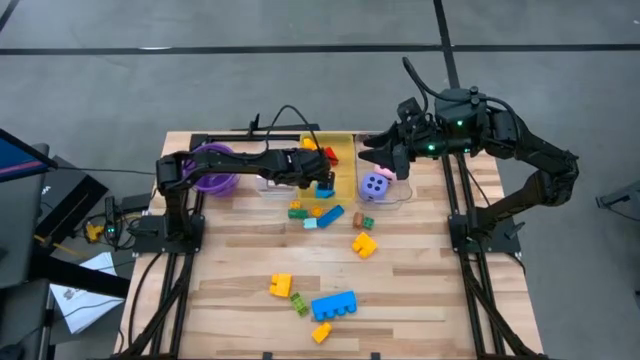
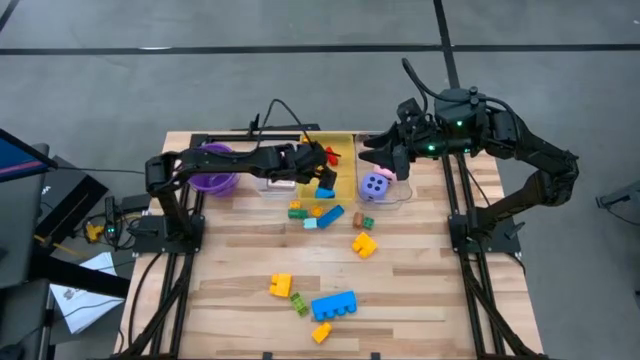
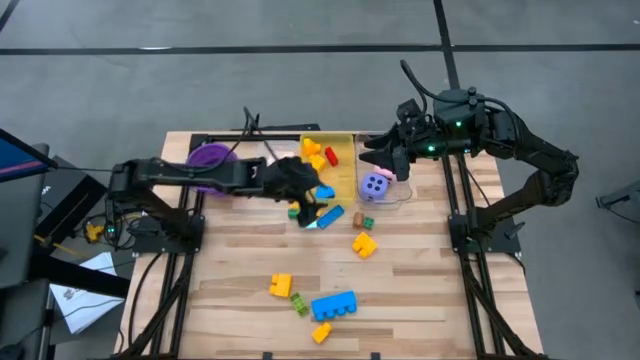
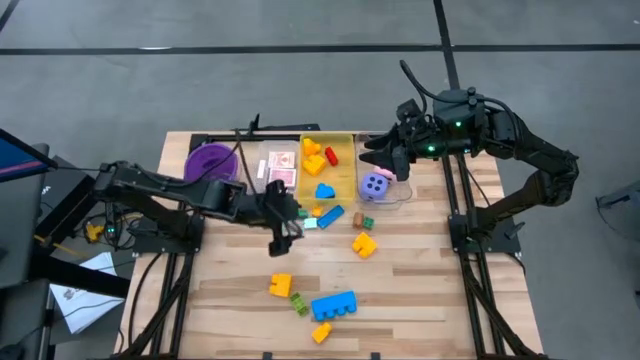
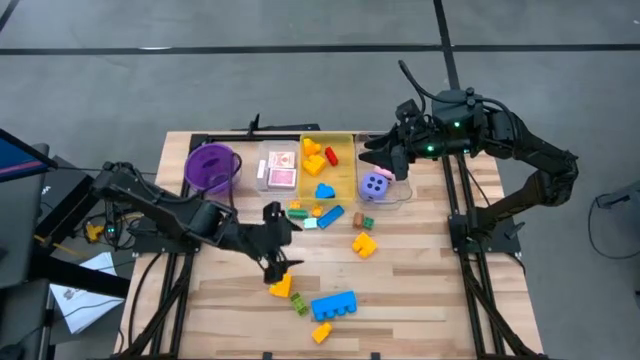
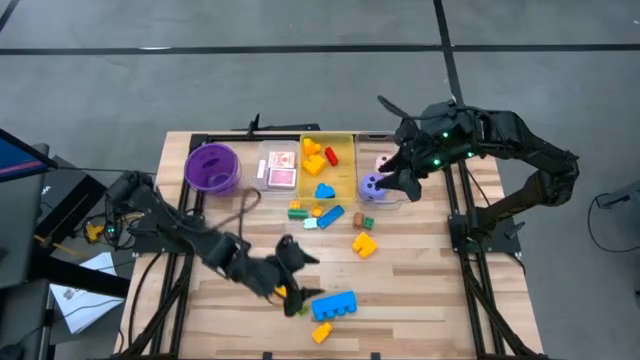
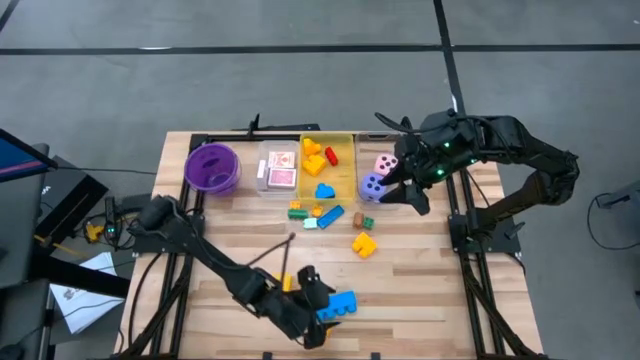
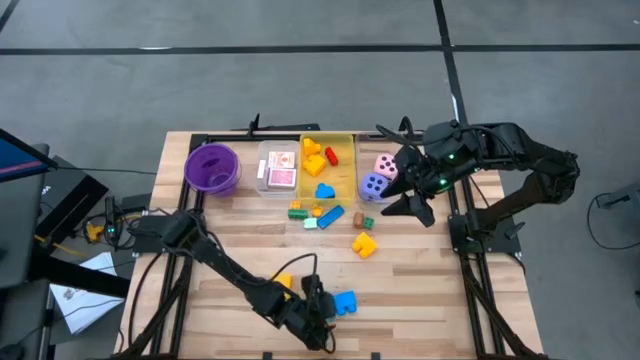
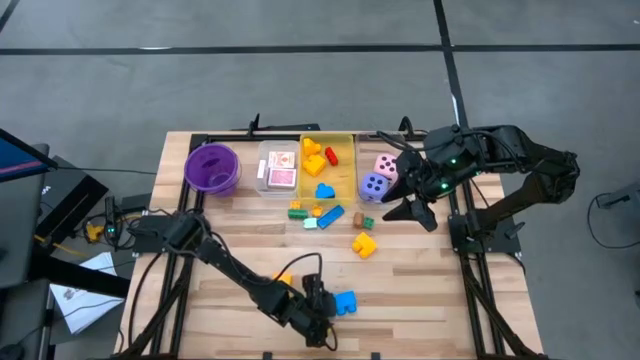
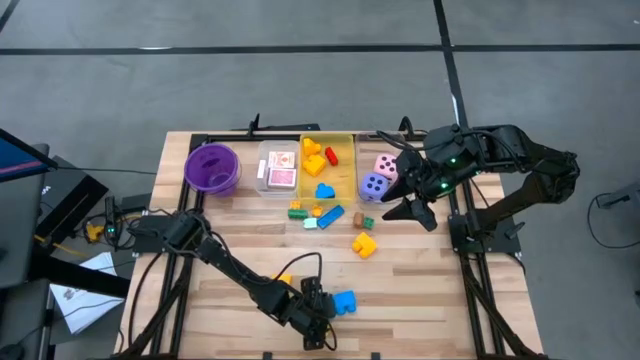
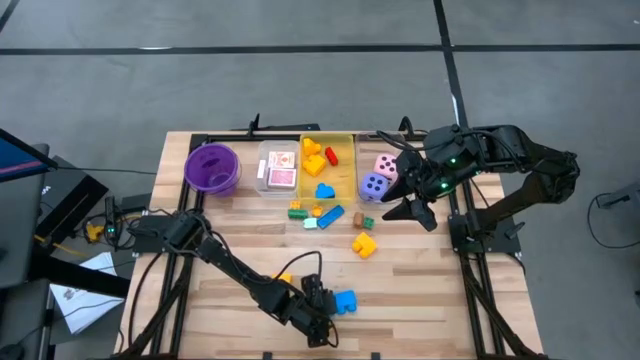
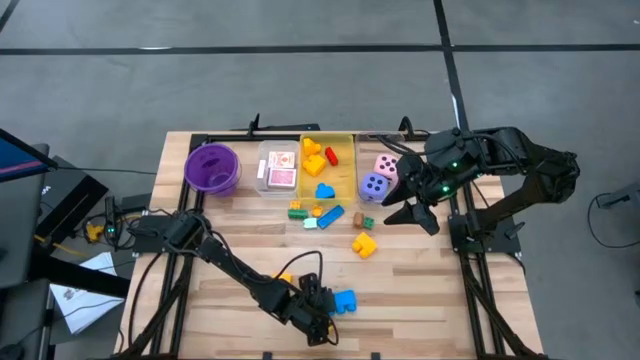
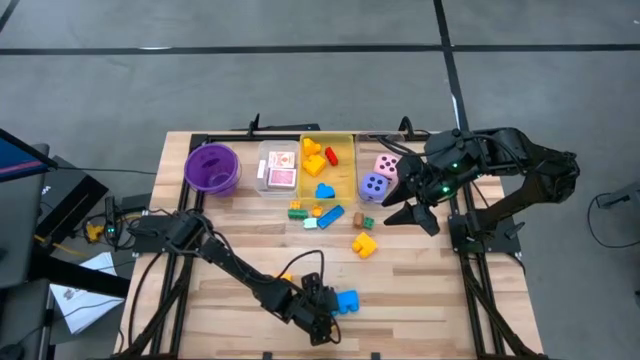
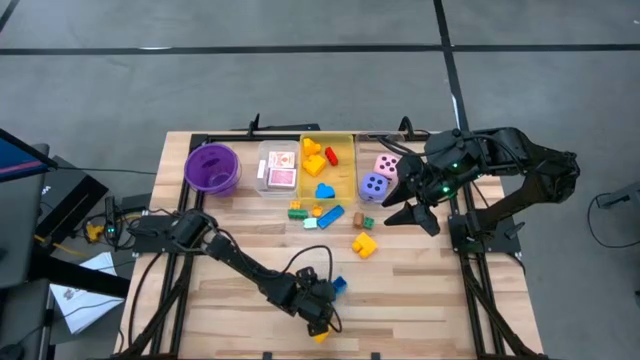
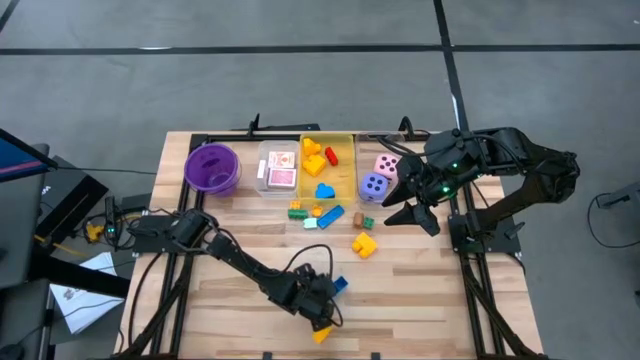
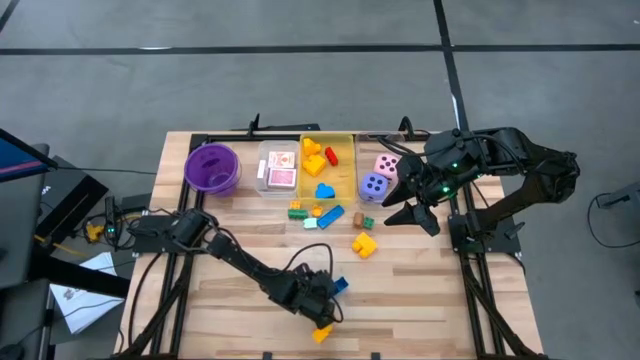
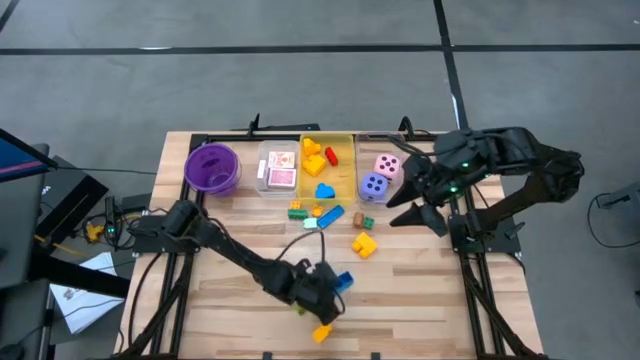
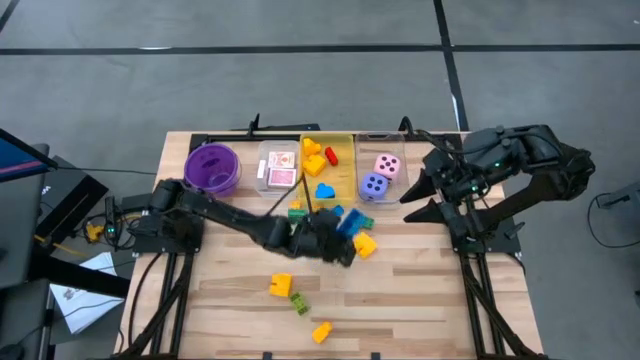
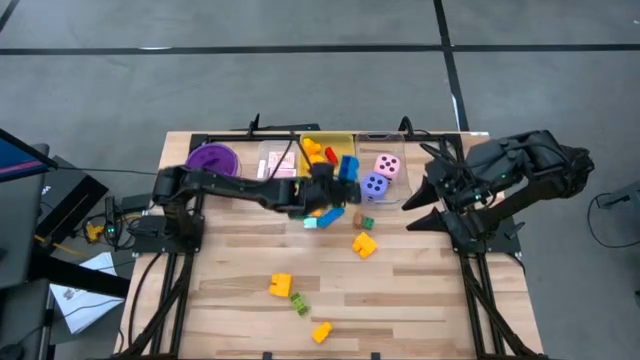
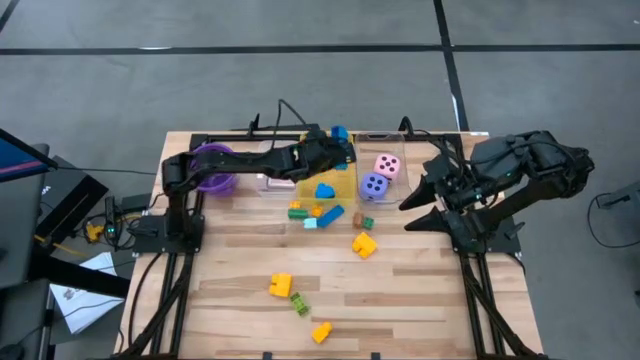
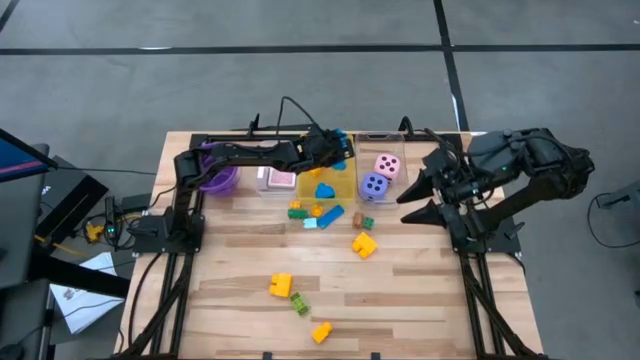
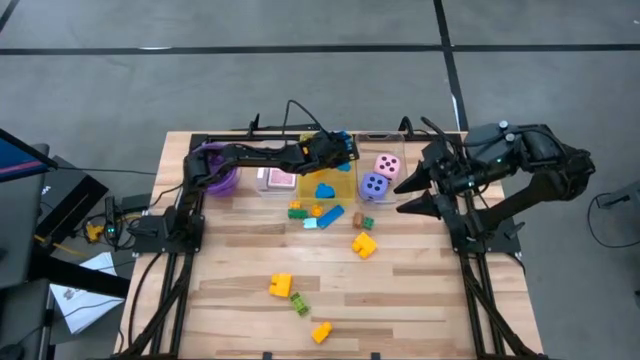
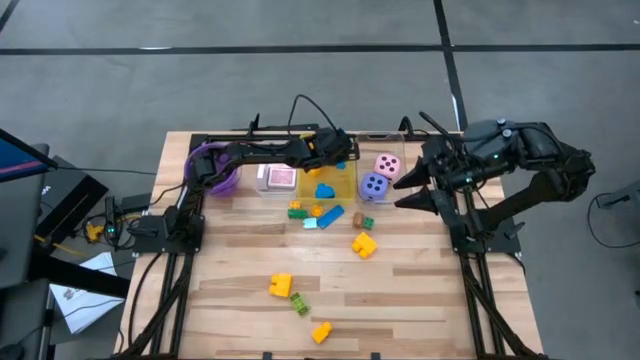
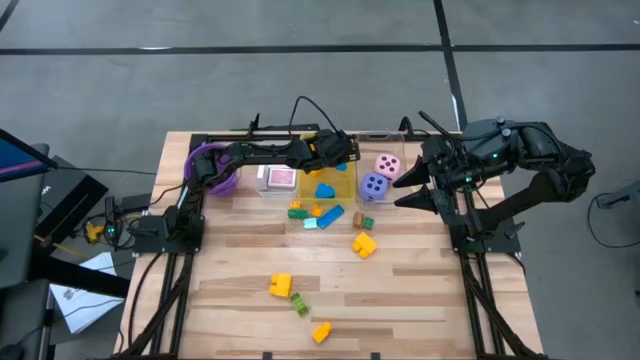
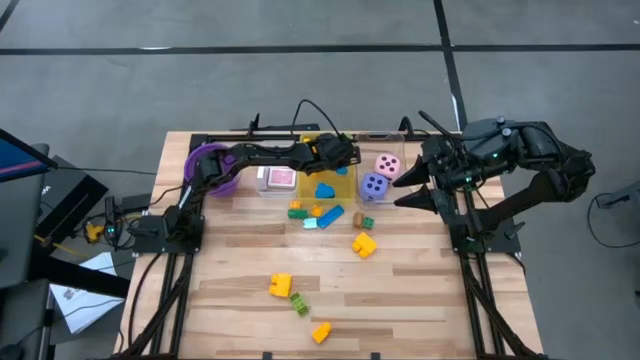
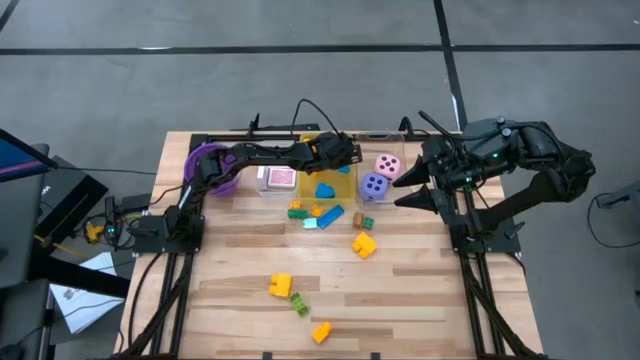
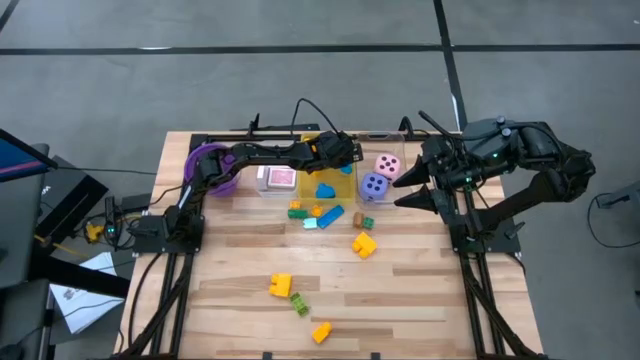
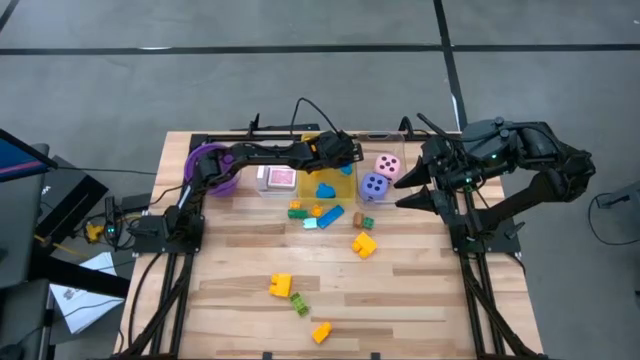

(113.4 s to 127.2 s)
Task: Pick & Place Toys
Put the blue gamepiece into the yellow bin

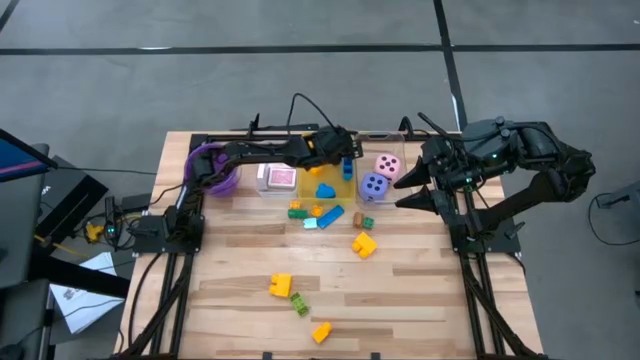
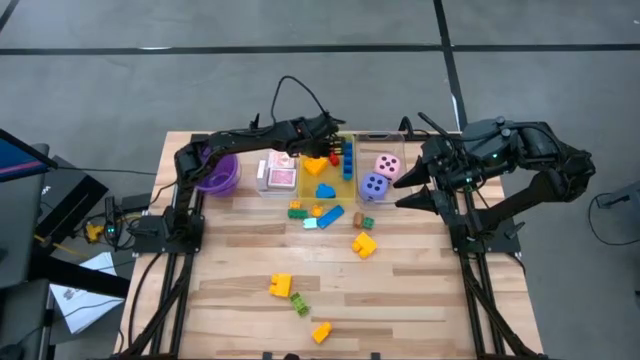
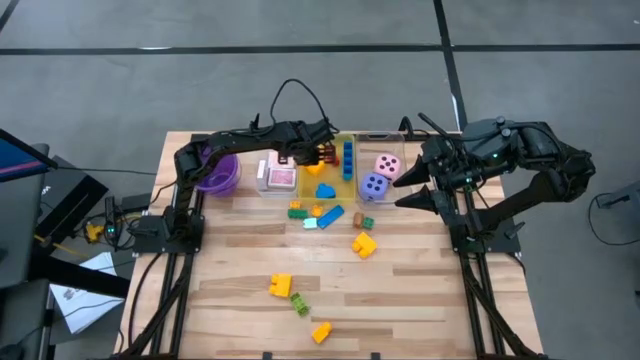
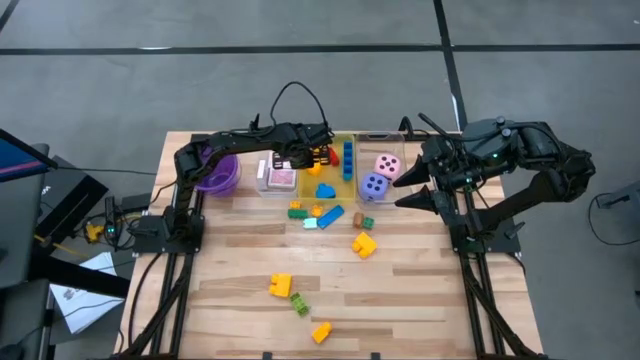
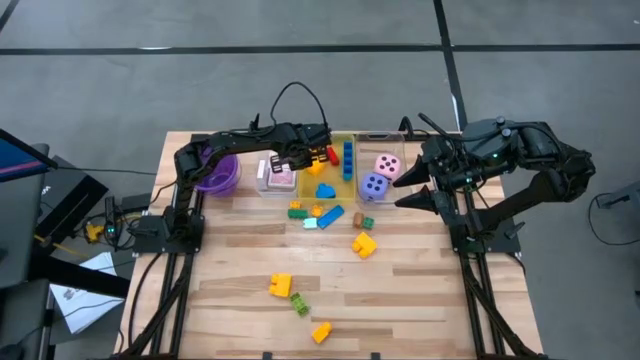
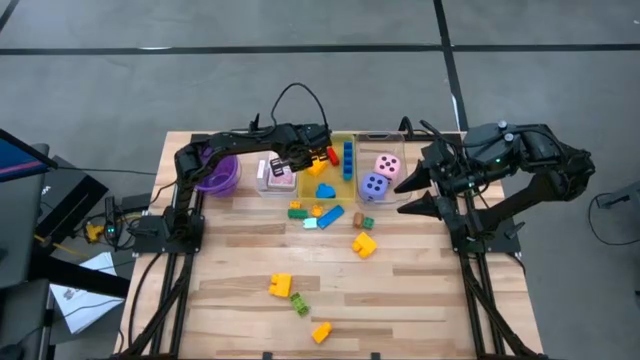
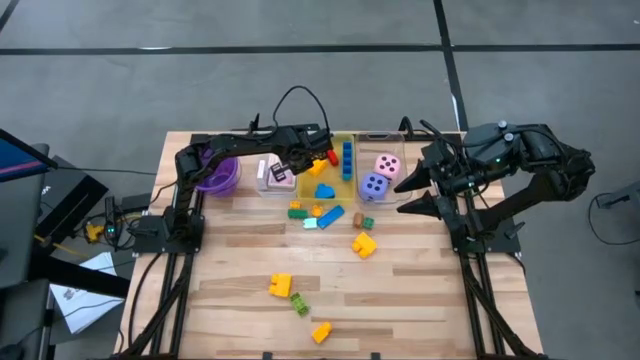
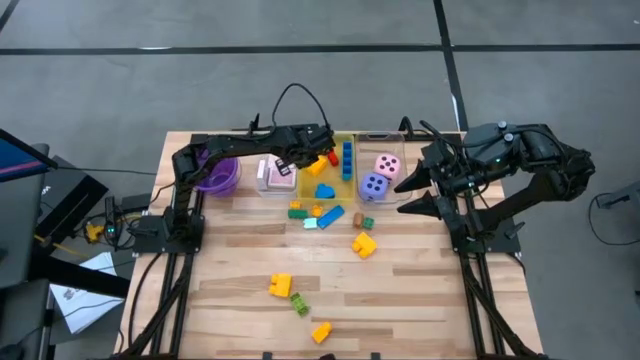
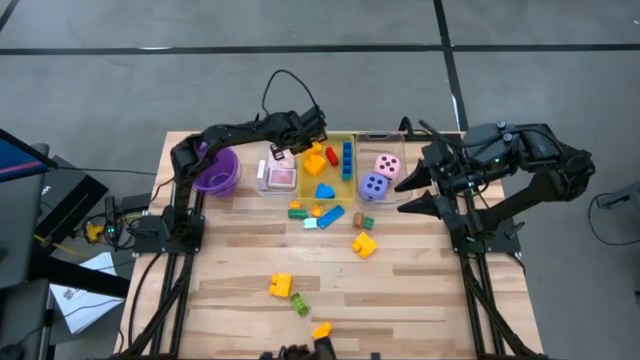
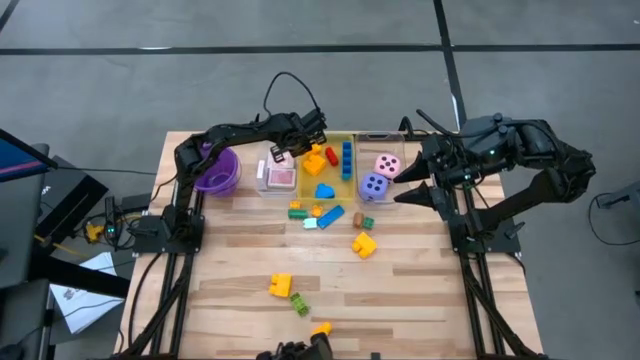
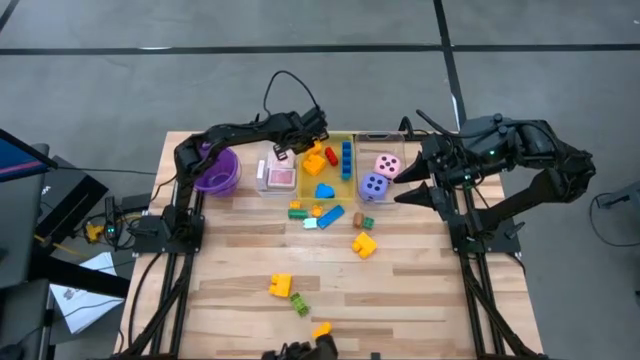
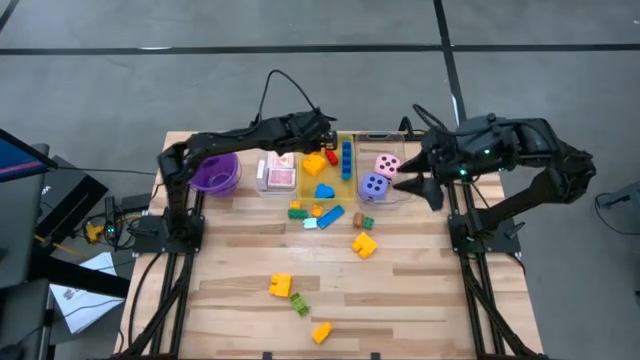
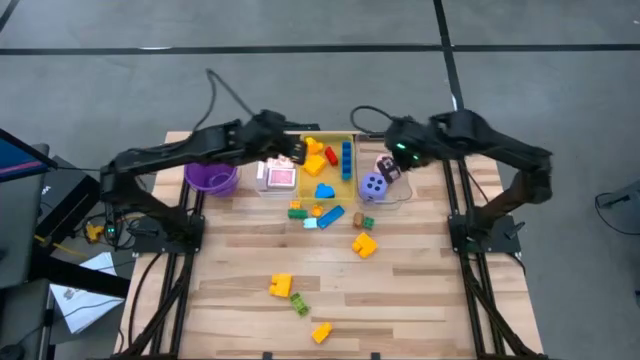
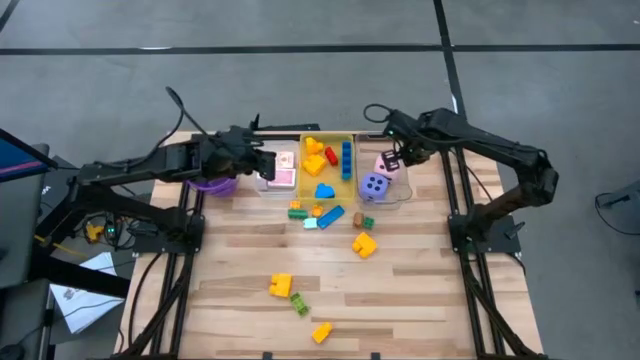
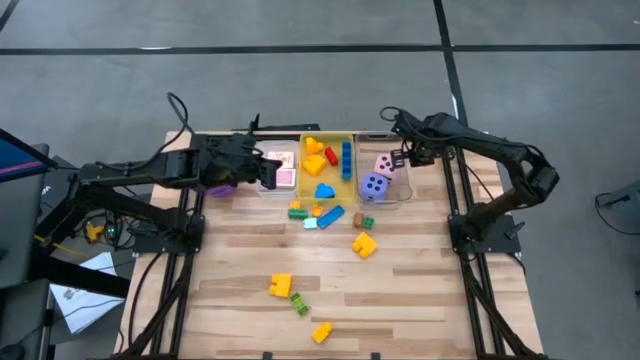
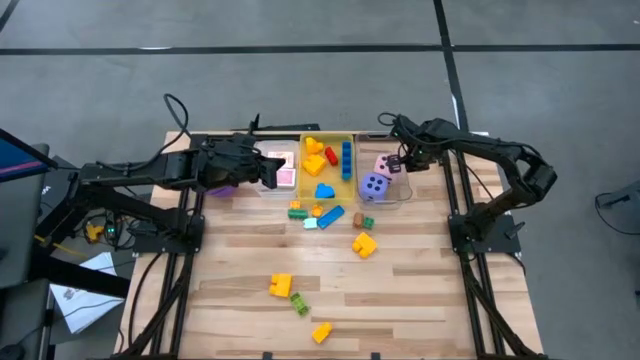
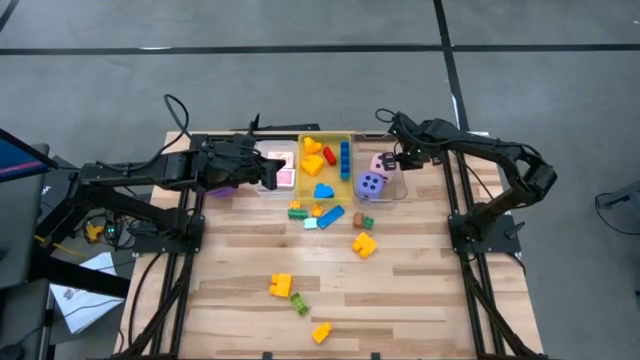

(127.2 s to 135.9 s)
Adjust the bins
